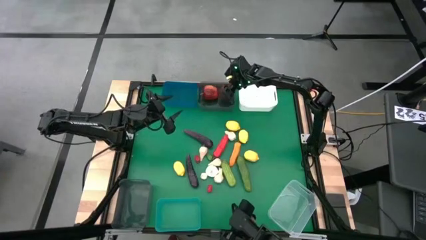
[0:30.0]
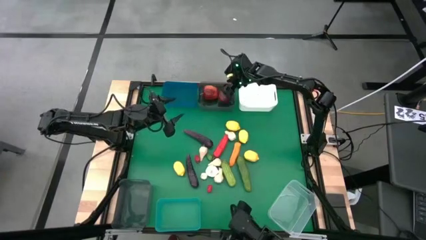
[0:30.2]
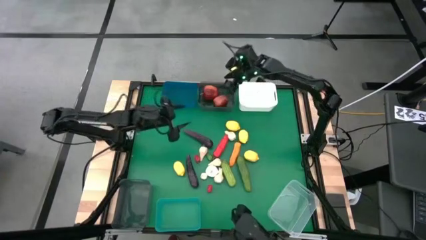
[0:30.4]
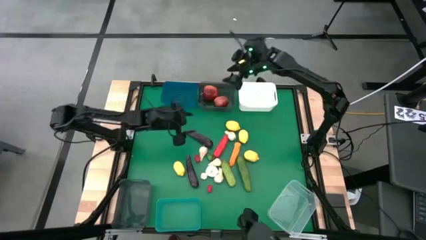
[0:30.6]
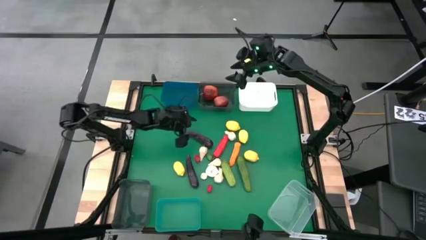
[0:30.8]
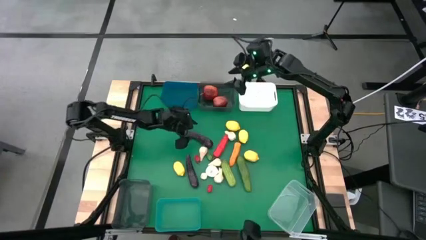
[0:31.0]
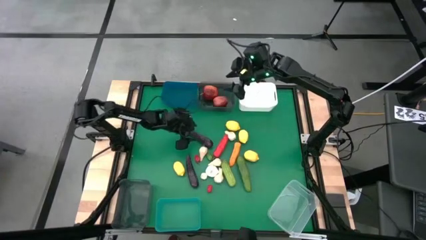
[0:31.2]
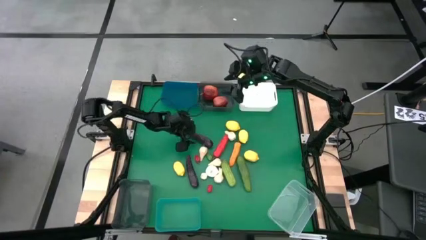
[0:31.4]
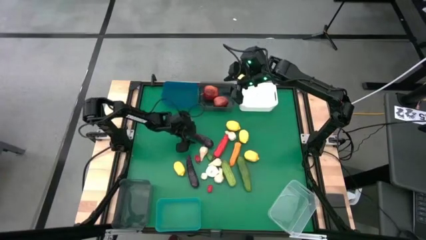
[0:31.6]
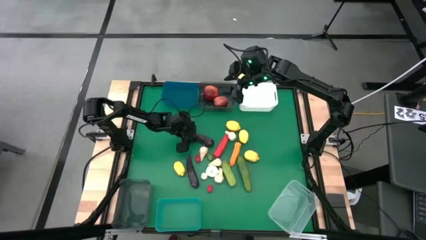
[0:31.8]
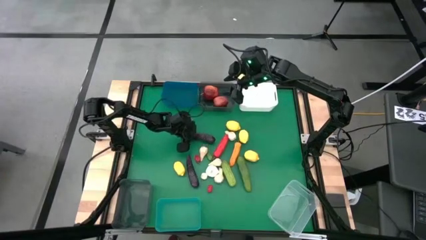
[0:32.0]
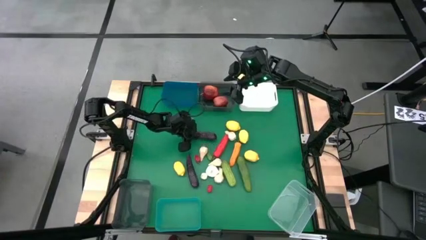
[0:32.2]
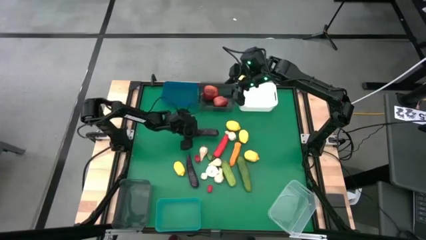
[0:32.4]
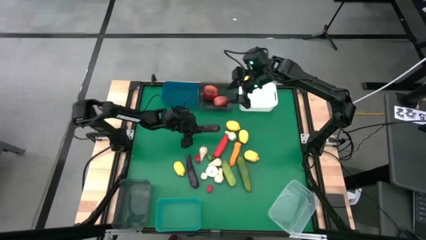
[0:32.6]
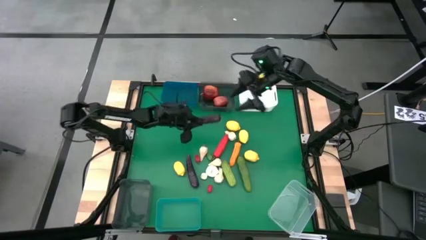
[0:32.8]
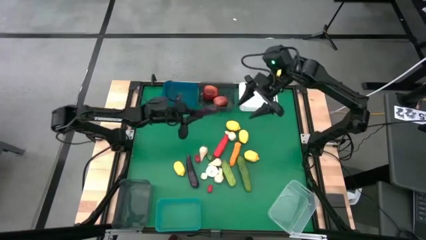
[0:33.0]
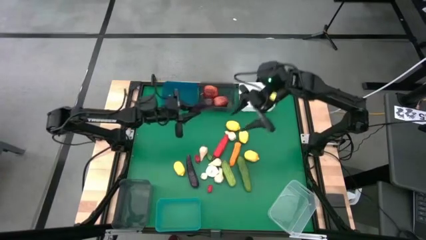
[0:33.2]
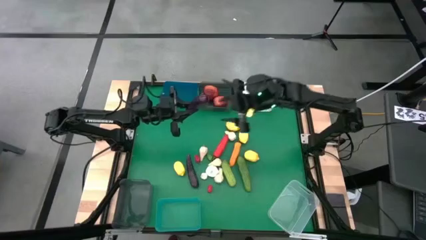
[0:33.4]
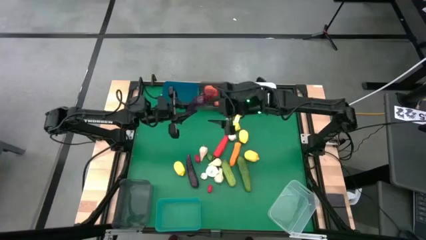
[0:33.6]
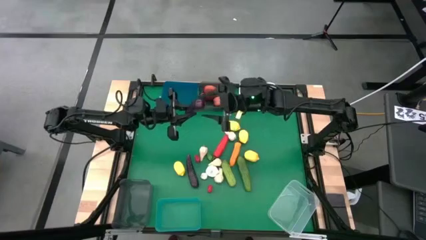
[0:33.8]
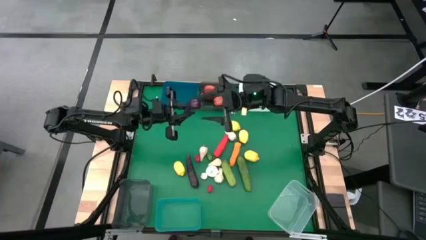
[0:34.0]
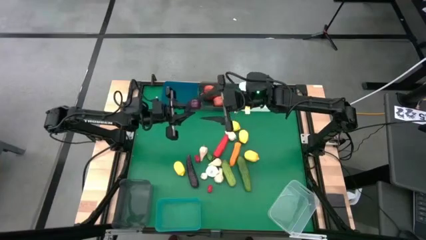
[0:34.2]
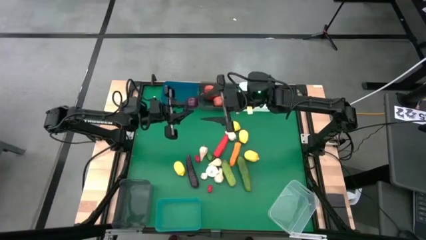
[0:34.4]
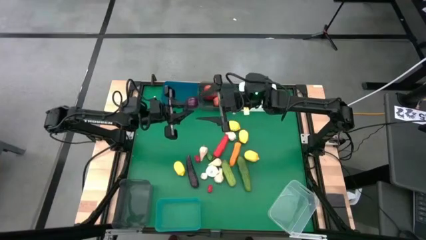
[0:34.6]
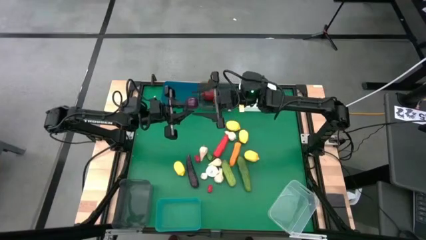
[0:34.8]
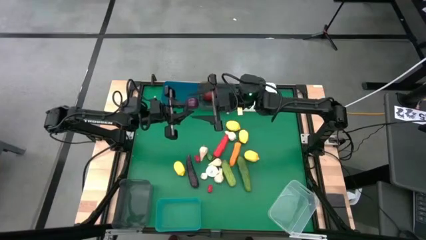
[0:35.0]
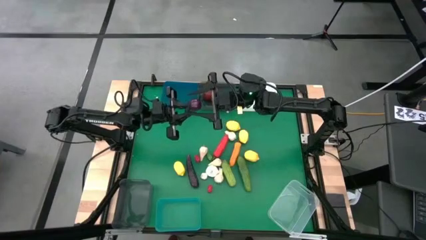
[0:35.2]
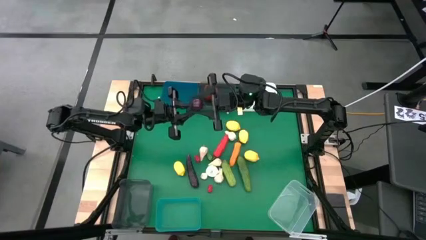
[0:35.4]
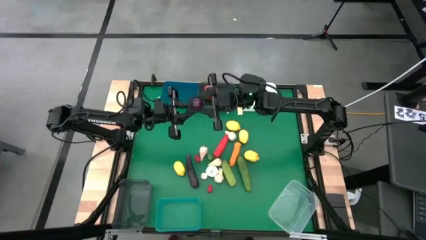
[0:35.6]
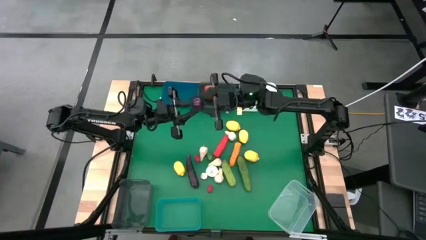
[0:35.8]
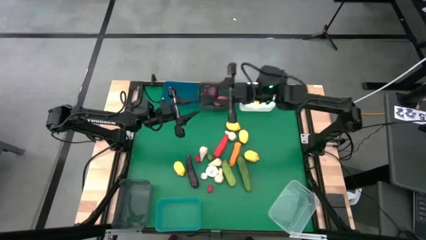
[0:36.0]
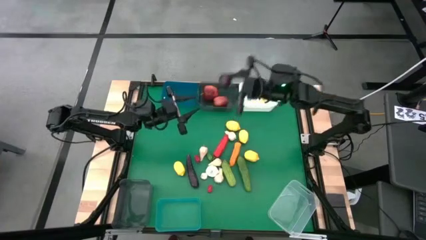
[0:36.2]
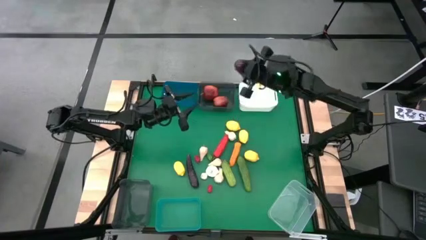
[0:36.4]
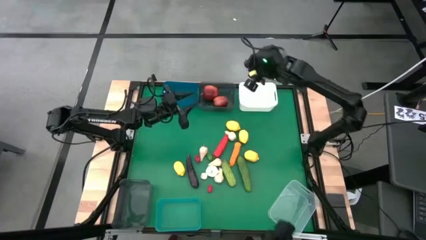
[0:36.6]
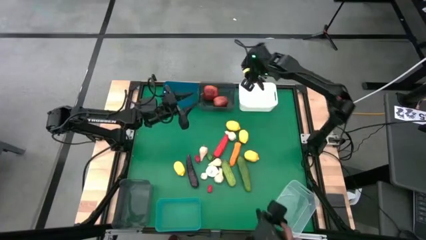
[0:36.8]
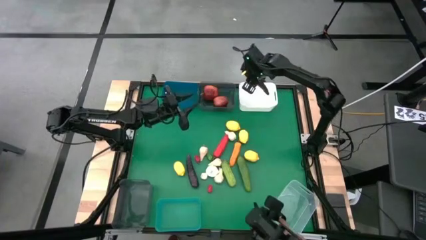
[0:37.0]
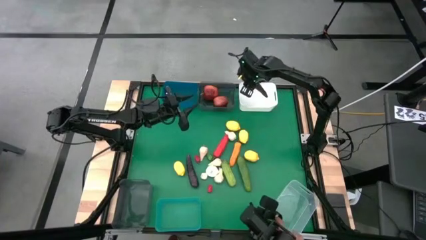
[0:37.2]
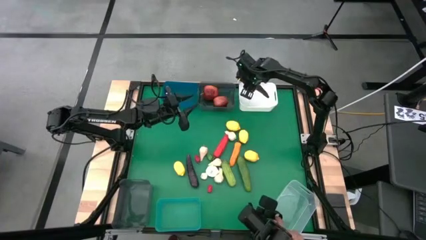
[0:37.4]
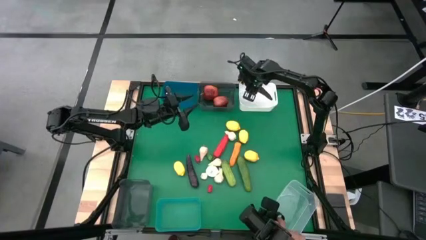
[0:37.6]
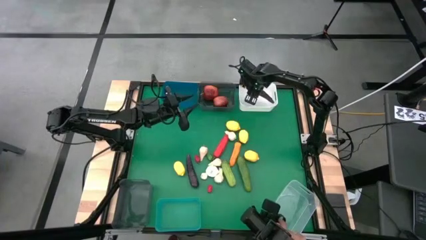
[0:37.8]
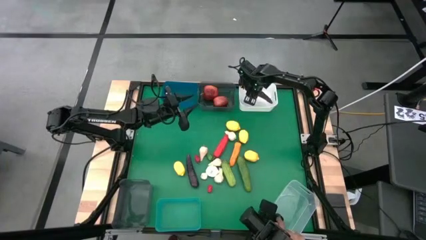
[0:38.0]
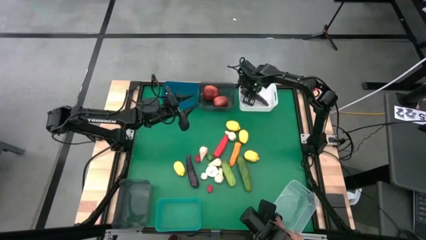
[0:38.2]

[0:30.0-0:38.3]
Task: Sort produce into baskets
Put the violet eggplant into the white bin

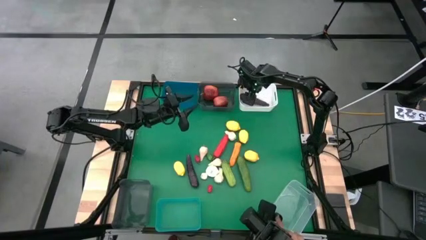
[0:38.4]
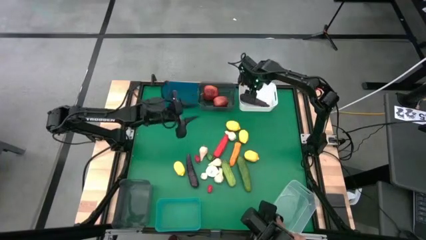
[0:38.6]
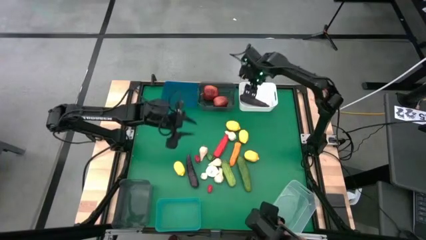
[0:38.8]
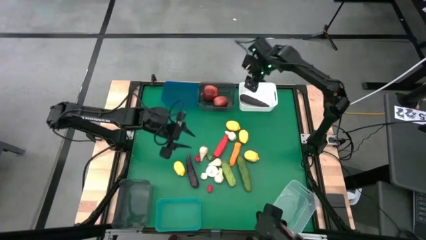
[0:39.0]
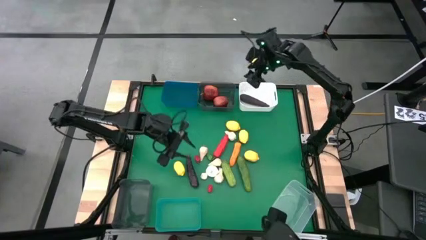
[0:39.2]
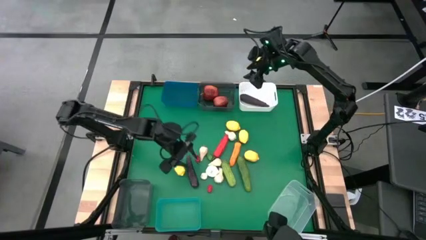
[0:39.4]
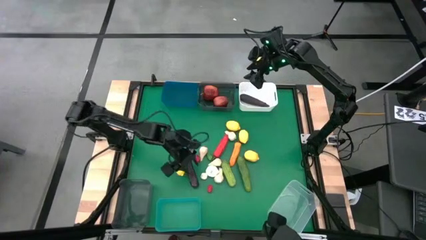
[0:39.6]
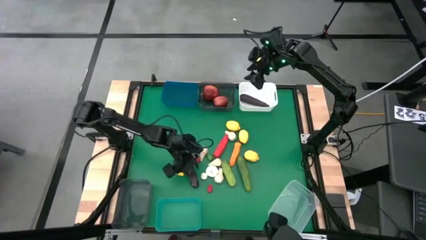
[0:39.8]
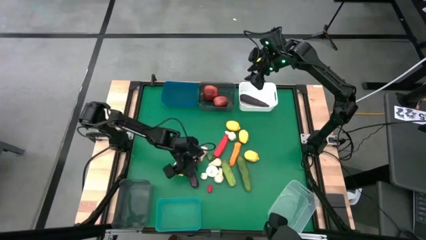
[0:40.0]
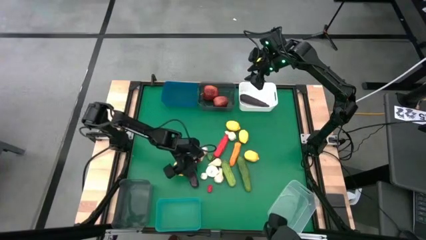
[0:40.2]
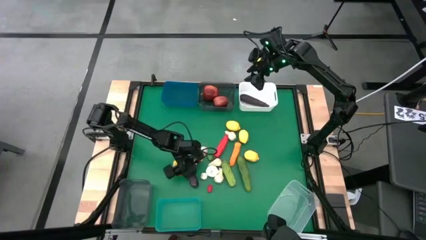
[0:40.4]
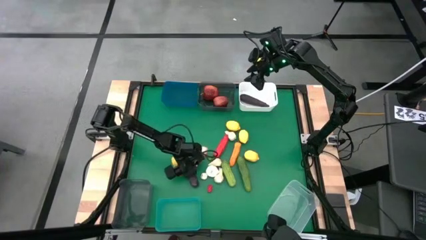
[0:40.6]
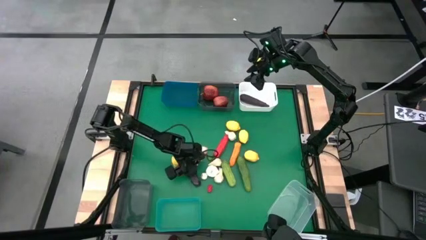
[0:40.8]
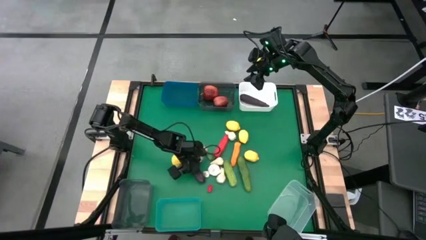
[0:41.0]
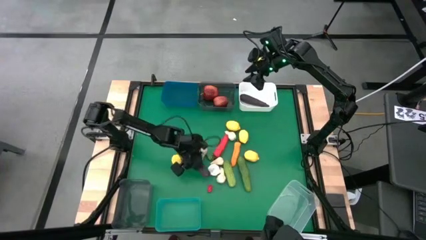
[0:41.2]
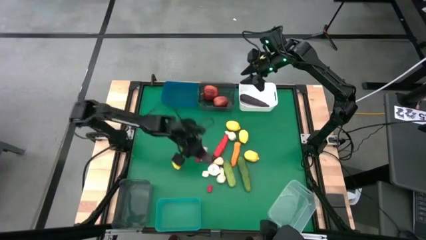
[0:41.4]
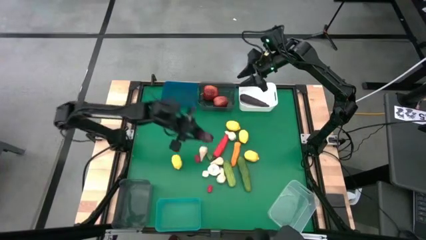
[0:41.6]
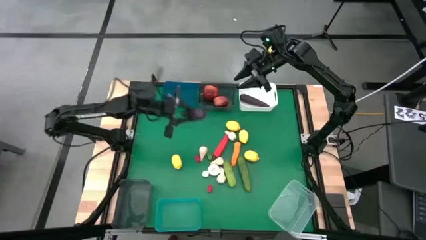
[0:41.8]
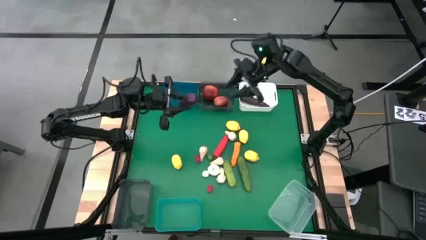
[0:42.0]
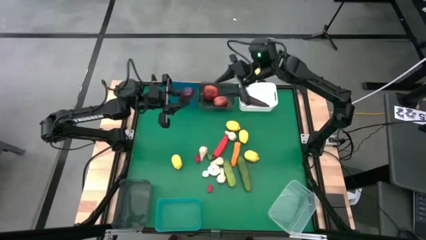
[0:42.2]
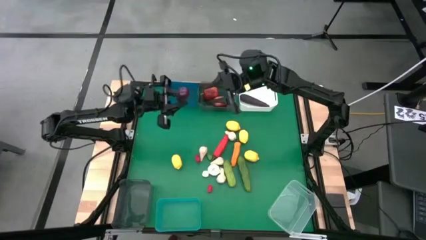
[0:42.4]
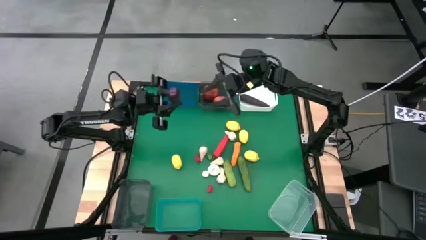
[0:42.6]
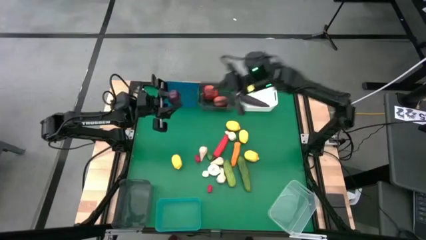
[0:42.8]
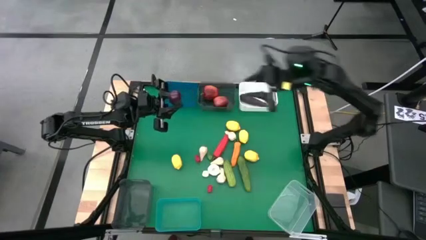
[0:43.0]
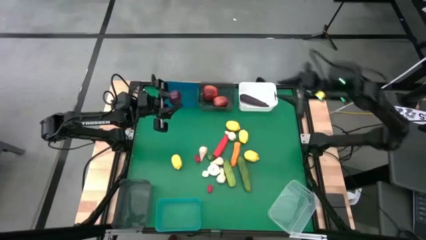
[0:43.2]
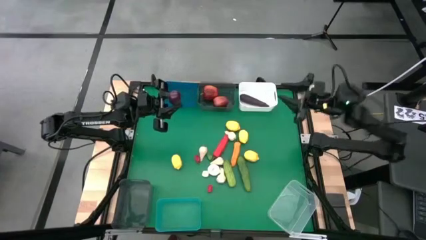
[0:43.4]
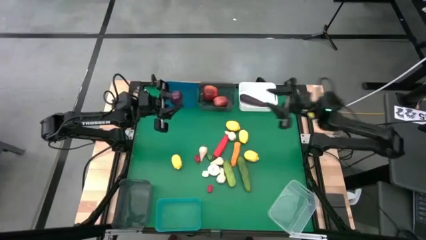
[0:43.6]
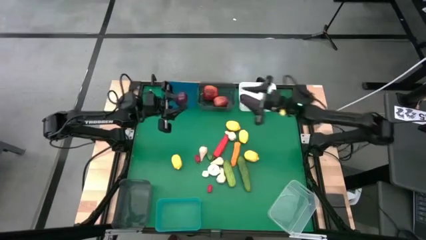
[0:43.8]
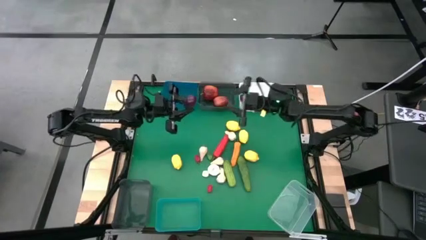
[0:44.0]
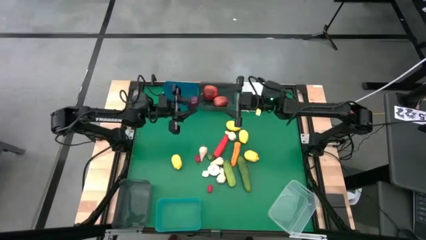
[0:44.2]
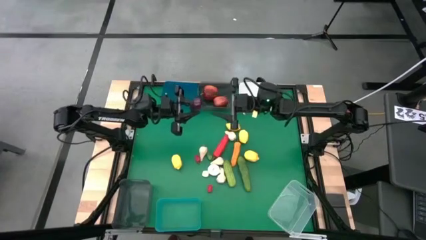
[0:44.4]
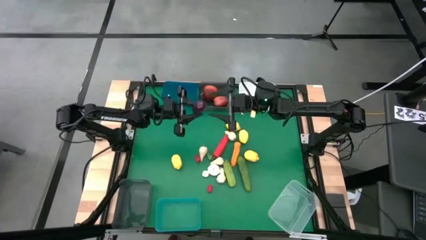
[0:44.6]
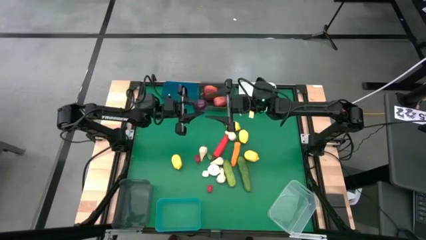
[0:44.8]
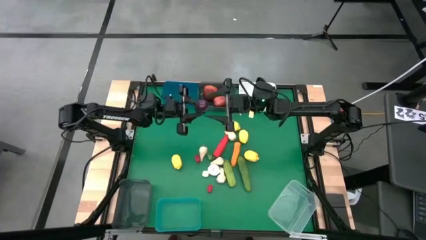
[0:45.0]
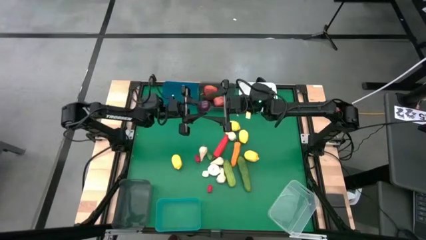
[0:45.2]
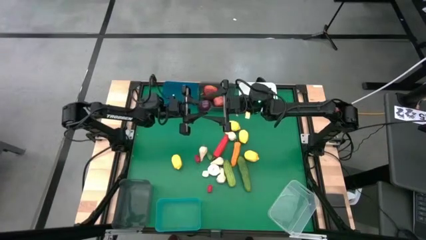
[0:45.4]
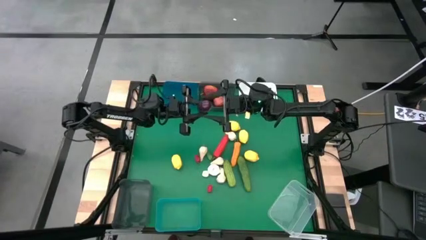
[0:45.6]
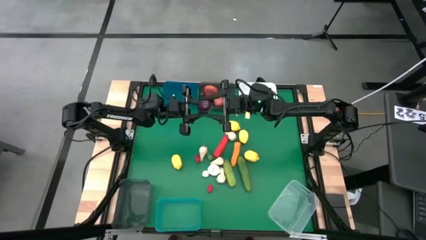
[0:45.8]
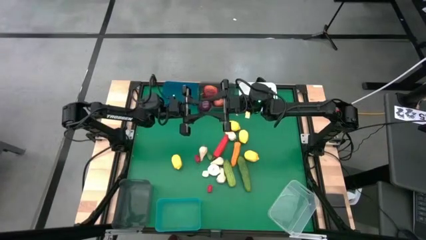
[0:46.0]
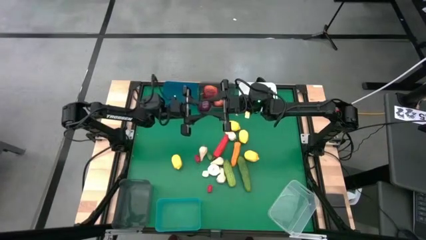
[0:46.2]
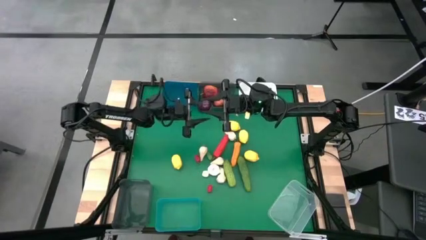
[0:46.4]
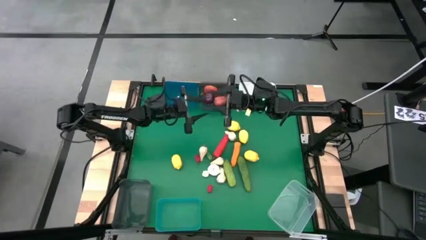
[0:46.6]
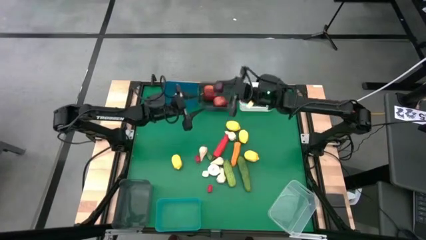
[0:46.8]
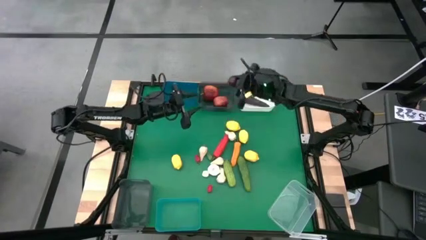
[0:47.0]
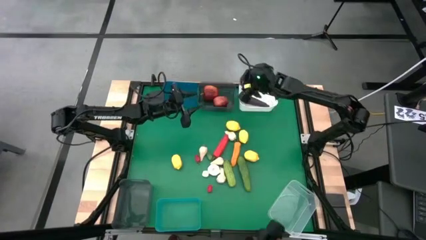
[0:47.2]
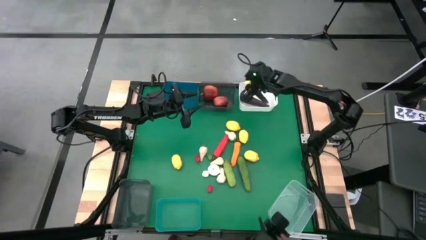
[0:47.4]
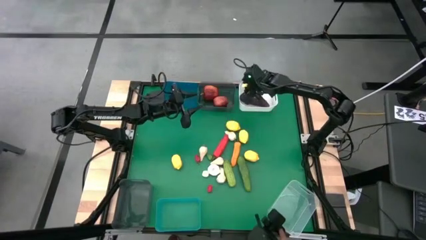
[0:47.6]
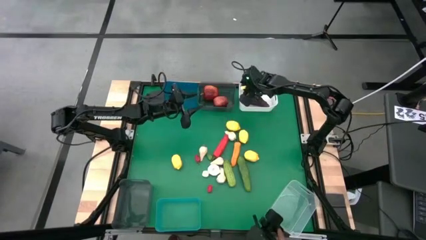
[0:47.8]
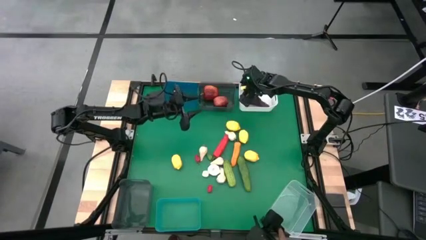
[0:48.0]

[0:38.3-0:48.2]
Put the violet eggplant into the white bin
